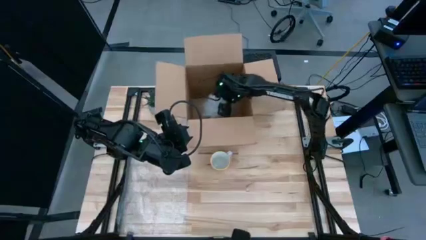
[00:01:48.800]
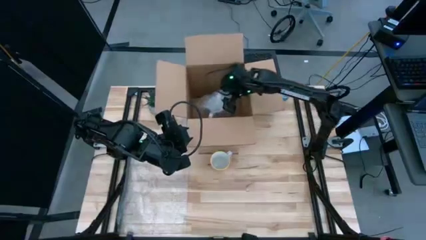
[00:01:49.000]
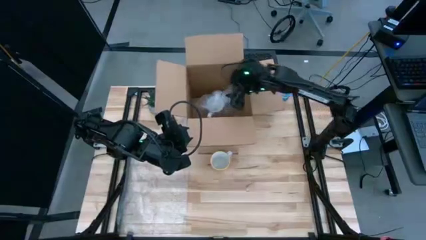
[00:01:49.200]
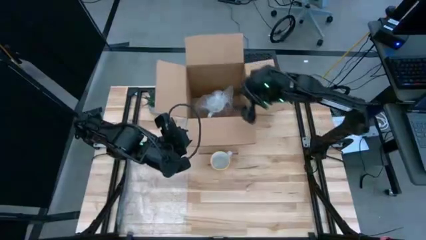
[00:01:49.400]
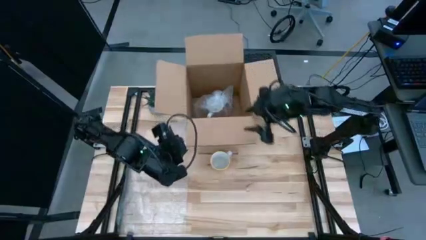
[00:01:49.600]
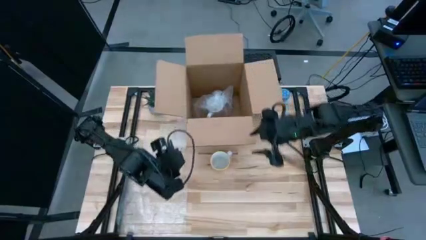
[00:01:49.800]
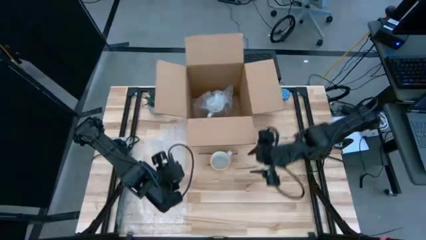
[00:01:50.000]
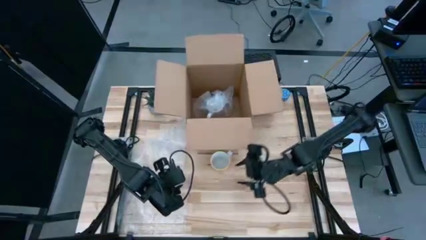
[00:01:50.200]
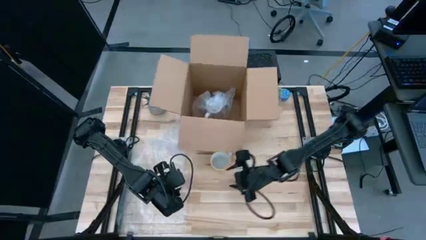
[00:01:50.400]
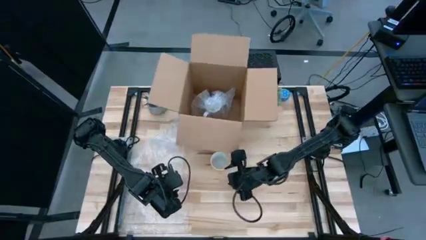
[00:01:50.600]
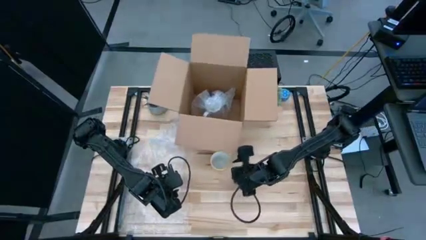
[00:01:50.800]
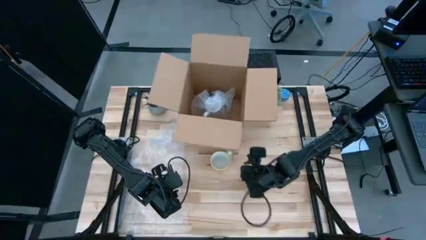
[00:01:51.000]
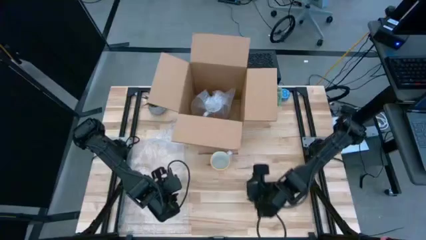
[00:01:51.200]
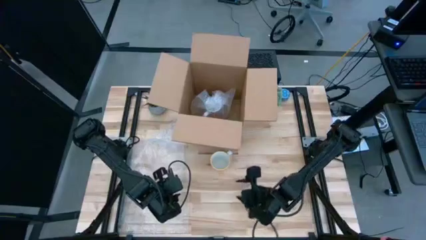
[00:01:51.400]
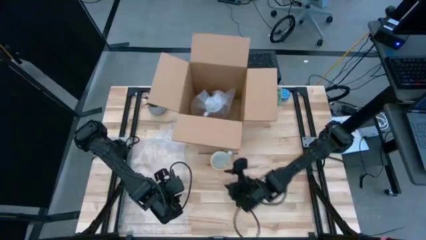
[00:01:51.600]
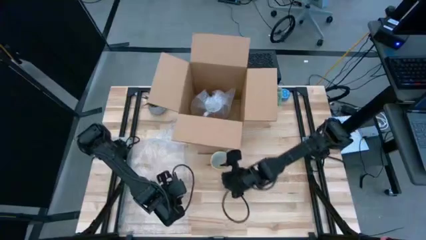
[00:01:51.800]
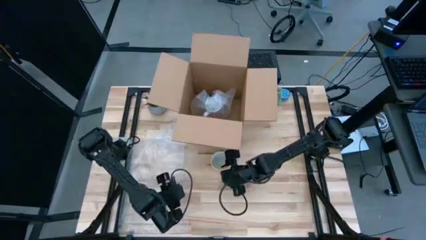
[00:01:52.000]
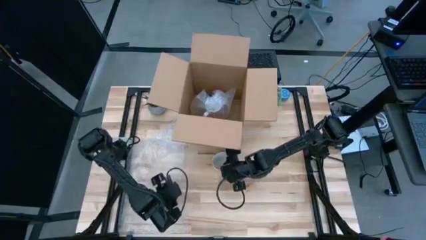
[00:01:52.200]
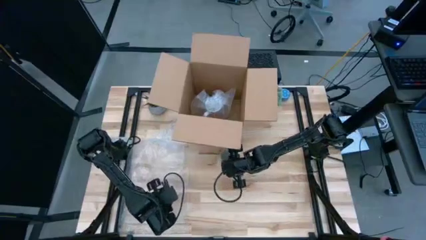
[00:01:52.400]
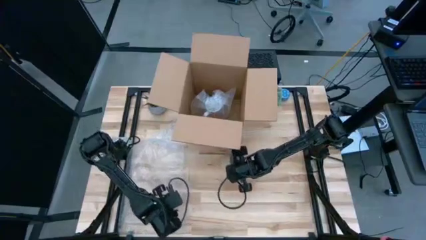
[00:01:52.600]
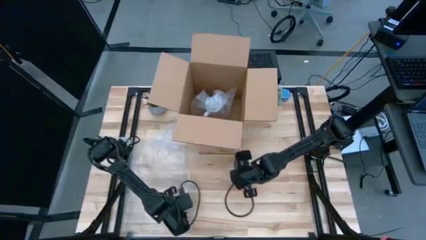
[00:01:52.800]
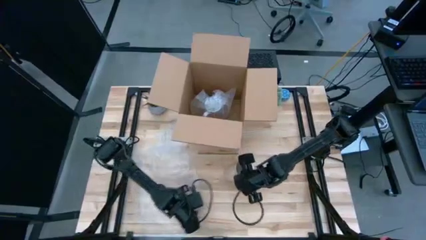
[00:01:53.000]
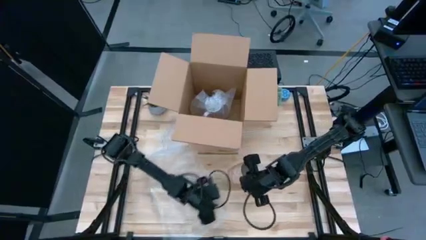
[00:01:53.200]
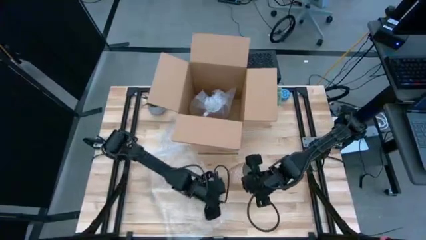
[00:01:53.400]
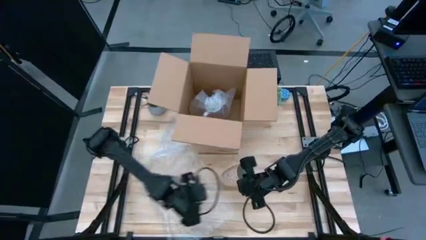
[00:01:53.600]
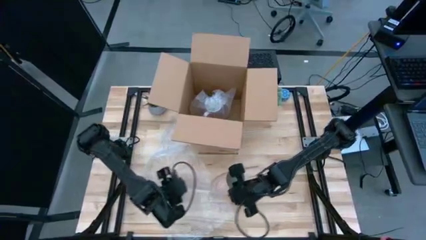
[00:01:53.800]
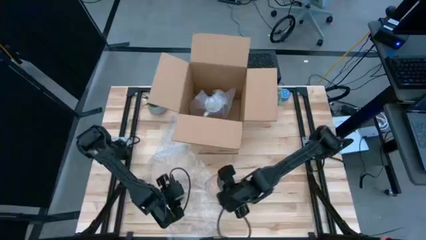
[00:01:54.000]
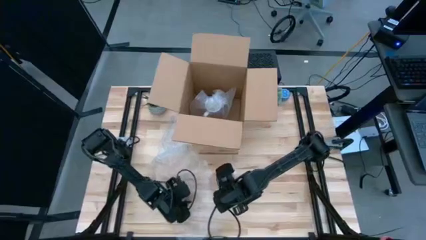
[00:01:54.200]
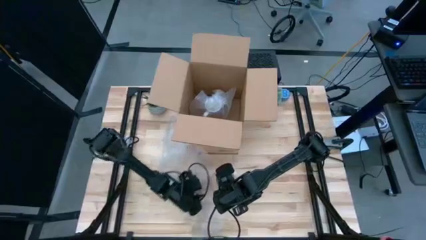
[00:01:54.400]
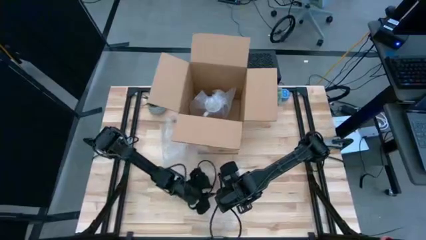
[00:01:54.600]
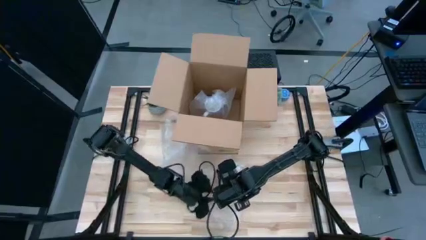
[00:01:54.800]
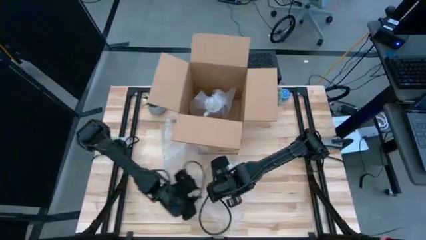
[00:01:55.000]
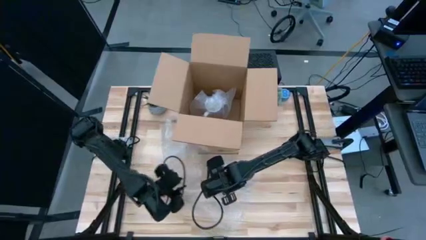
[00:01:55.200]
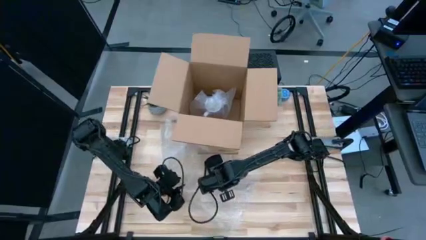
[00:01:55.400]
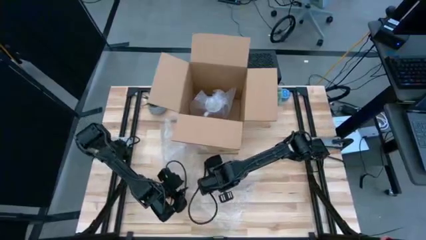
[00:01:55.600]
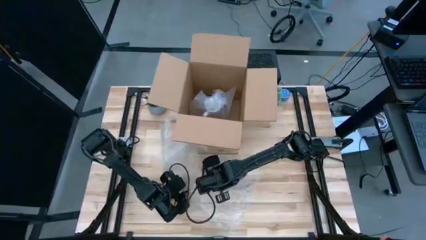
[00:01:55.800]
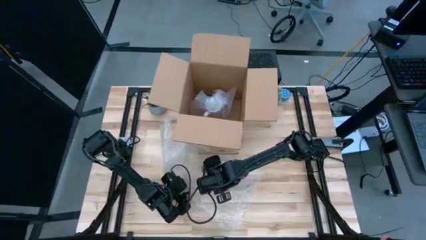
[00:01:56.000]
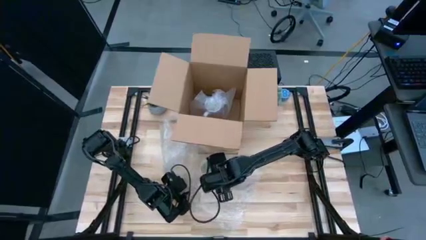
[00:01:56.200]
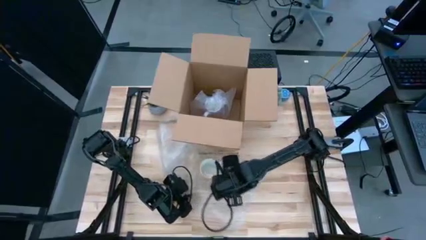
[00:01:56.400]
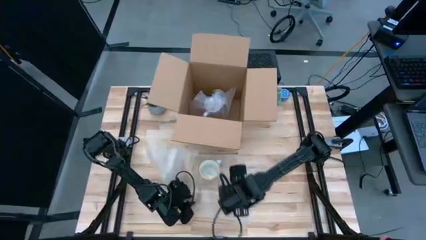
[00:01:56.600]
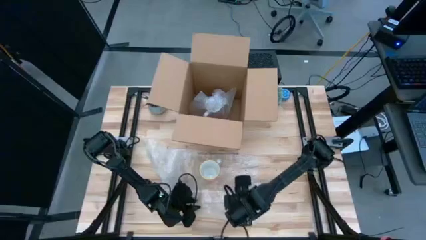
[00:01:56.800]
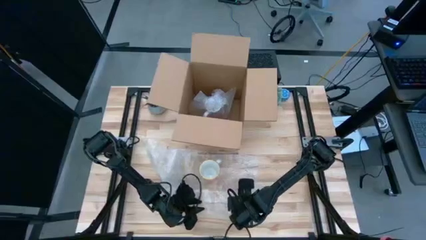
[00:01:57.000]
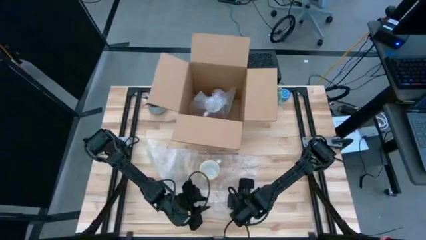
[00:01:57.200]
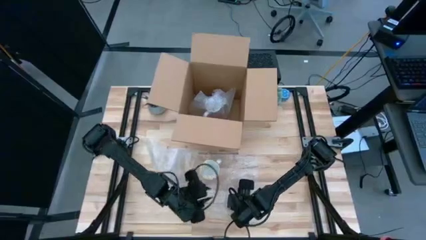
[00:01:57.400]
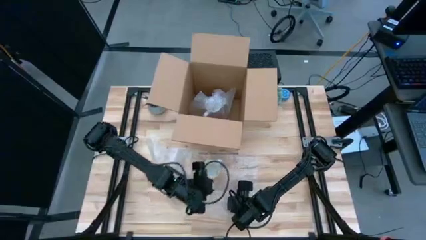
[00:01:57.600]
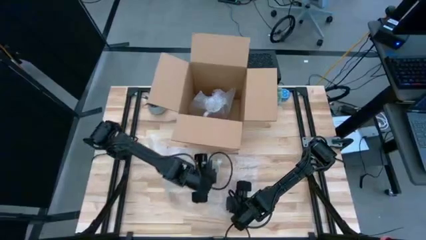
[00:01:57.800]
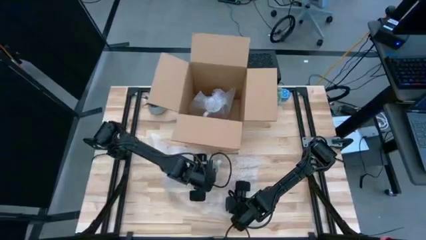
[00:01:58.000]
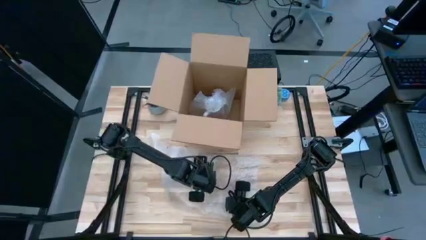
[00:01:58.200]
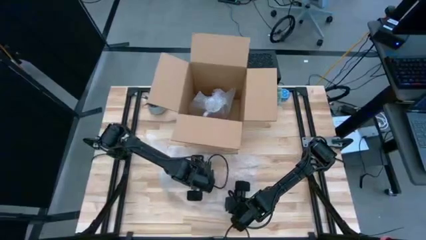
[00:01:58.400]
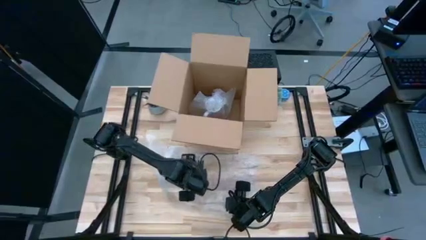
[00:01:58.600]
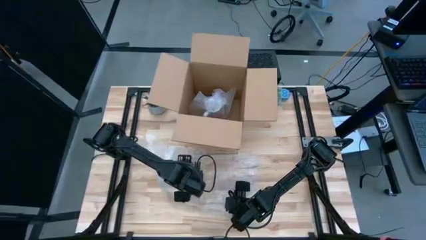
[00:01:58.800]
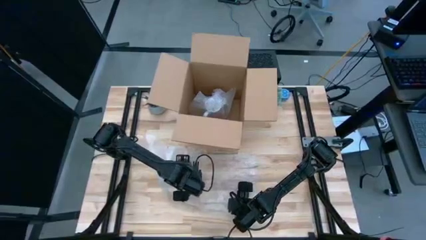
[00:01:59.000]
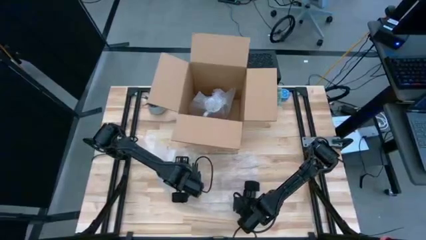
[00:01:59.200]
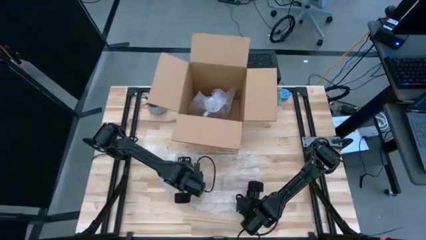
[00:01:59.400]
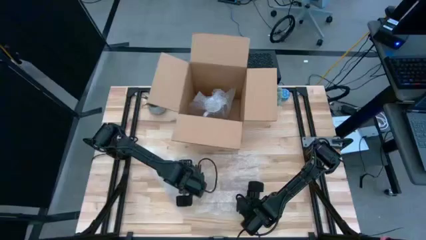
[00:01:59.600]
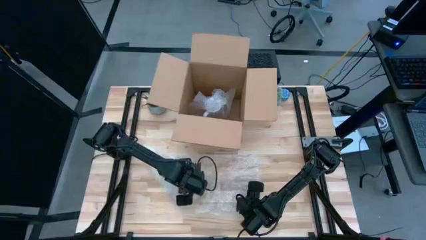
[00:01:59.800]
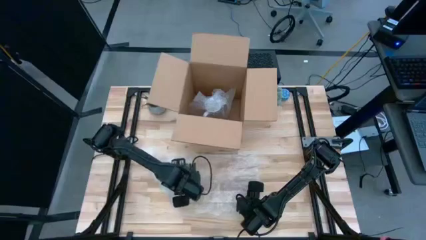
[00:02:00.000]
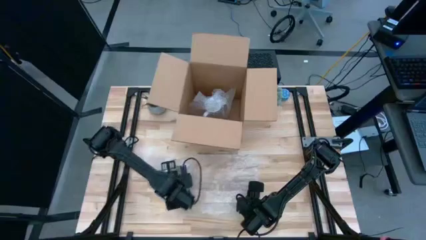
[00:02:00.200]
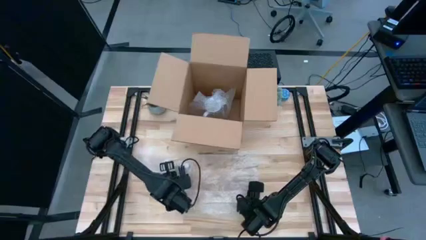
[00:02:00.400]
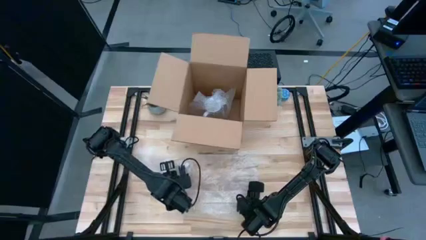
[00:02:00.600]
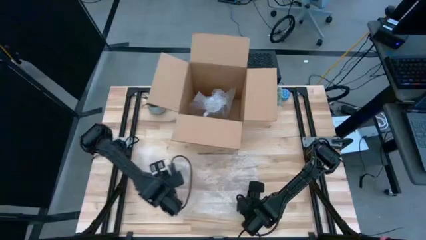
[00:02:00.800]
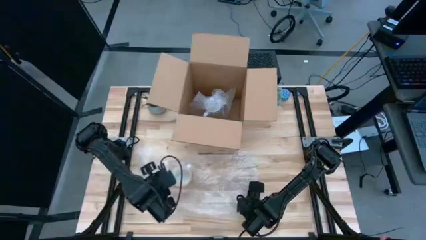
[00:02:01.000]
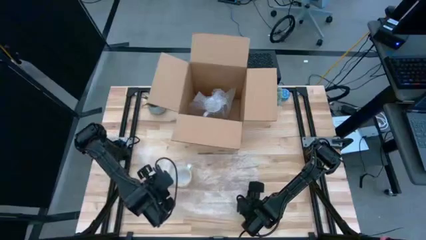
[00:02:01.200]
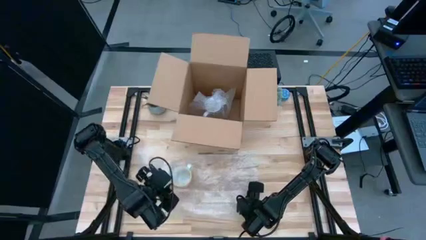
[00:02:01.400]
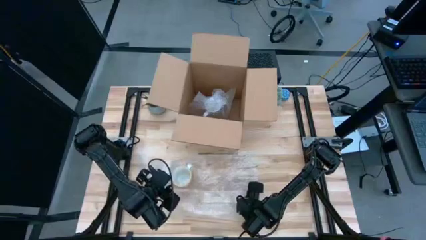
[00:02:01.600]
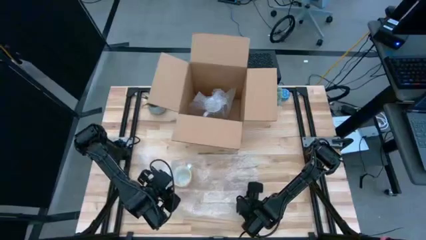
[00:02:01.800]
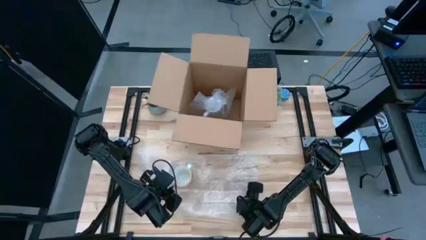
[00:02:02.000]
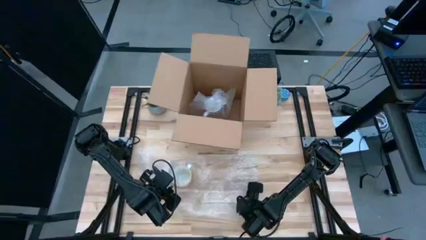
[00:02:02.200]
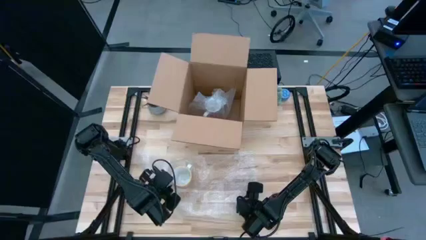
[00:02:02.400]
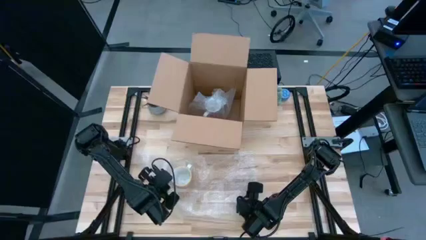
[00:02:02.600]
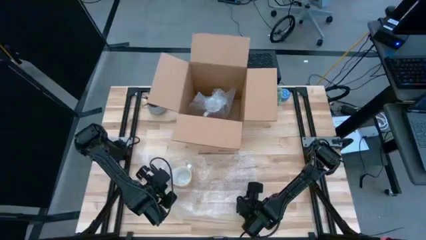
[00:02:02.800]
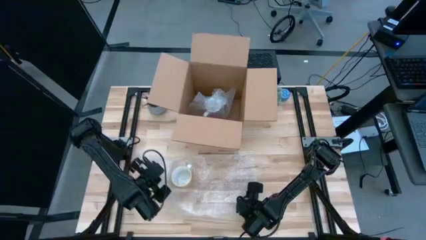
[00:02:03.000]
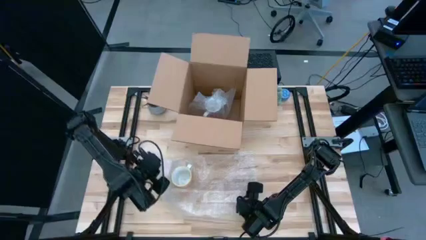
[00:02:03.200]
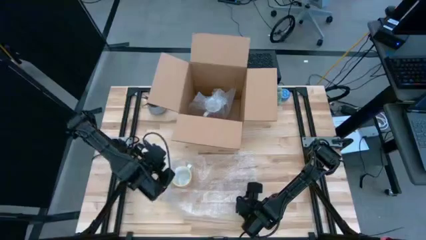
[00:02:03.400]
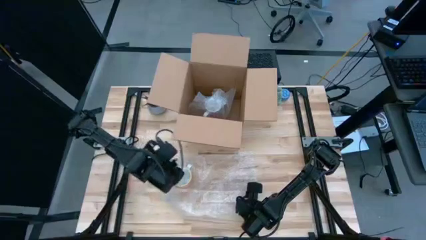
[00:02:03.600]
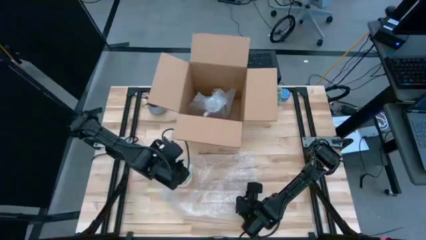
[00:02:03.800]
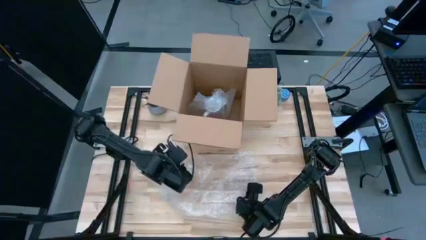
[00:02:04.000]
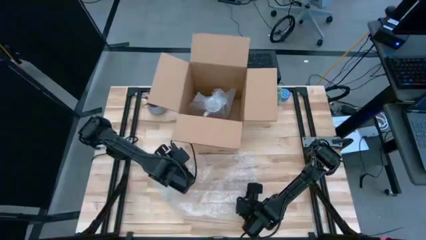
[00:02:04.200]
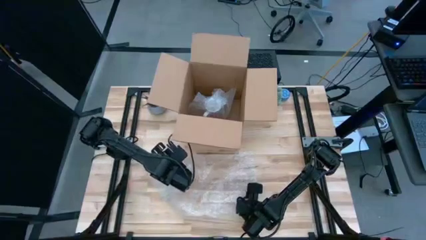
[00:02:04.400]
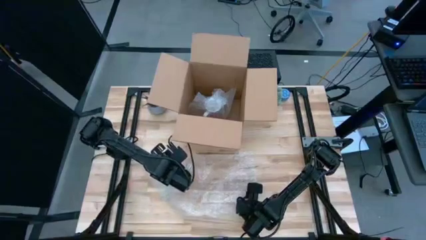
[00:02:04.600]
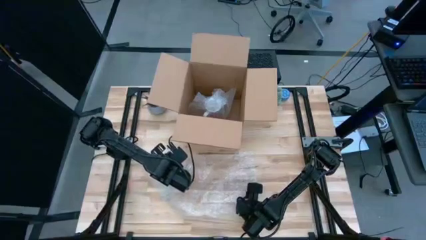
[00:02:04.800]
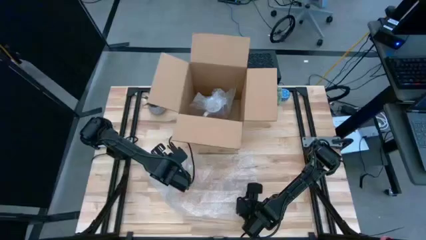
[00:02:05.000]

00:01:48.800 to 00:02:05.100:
Task: wrap mug
Wrap the orange mug with bubble wrap
